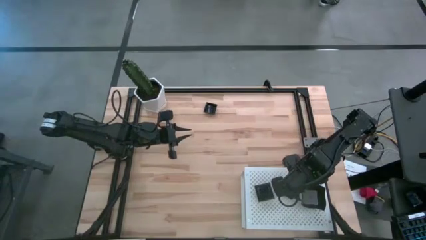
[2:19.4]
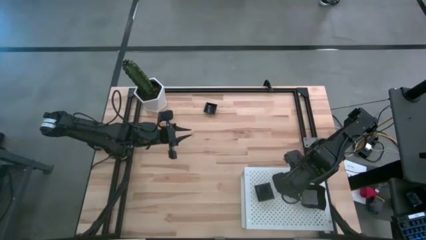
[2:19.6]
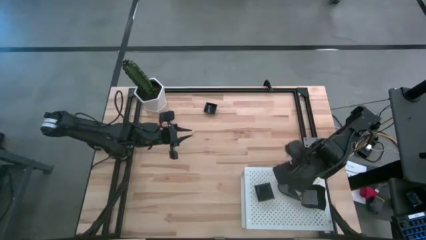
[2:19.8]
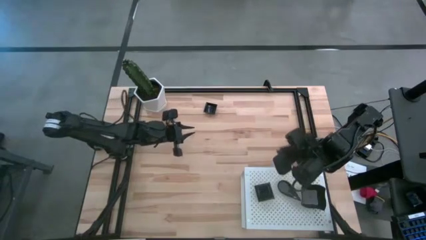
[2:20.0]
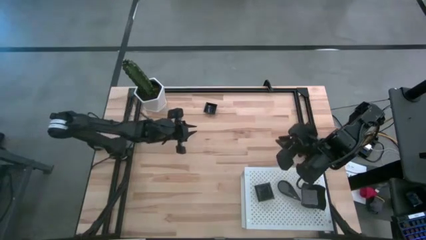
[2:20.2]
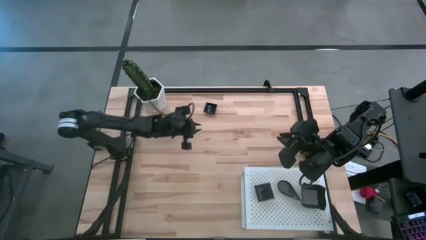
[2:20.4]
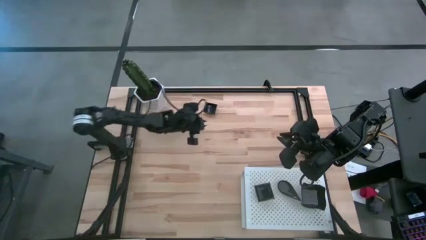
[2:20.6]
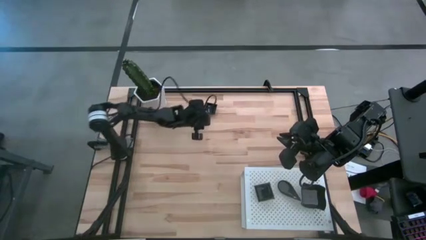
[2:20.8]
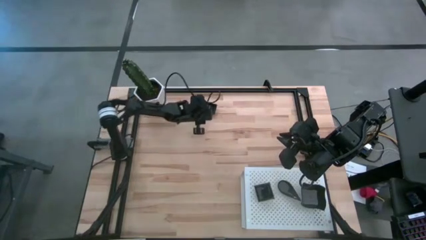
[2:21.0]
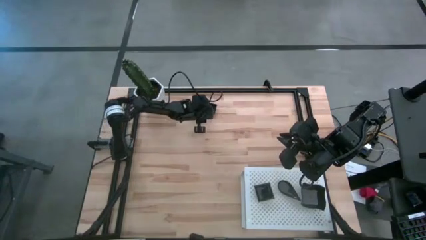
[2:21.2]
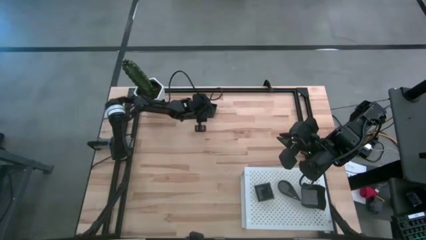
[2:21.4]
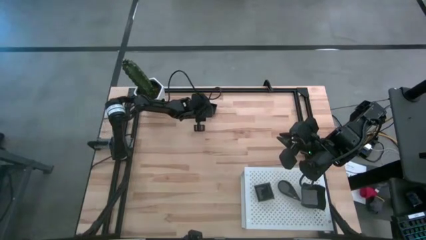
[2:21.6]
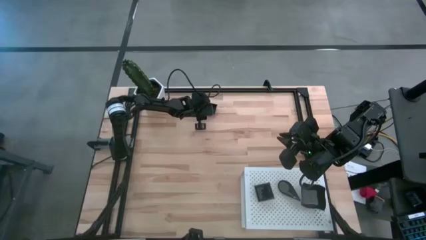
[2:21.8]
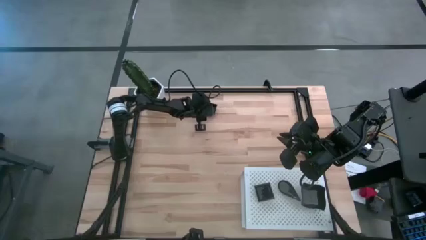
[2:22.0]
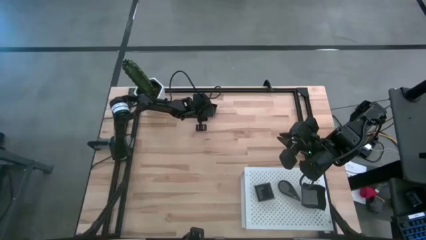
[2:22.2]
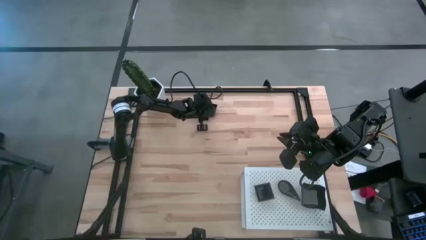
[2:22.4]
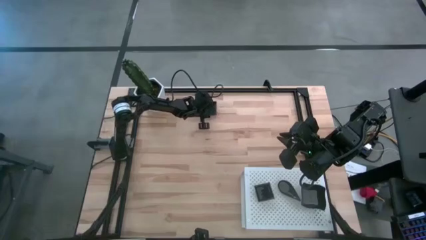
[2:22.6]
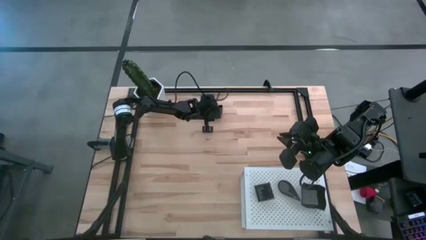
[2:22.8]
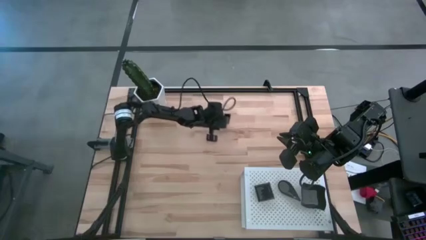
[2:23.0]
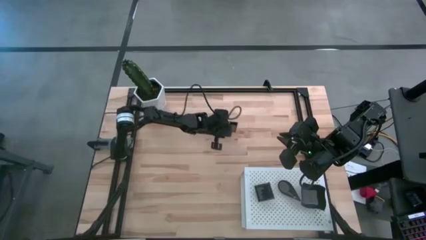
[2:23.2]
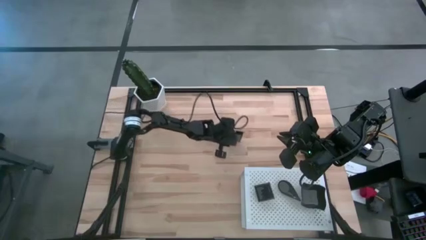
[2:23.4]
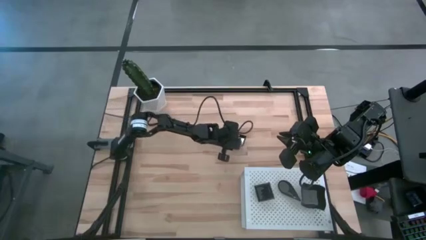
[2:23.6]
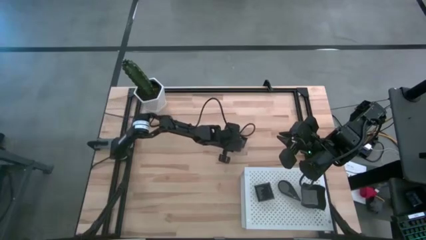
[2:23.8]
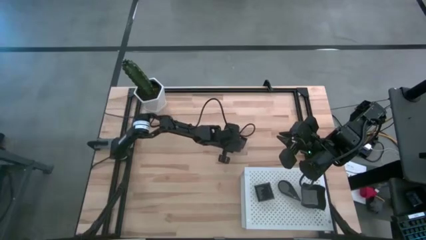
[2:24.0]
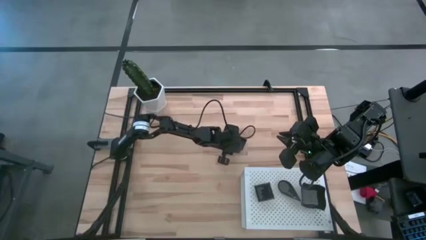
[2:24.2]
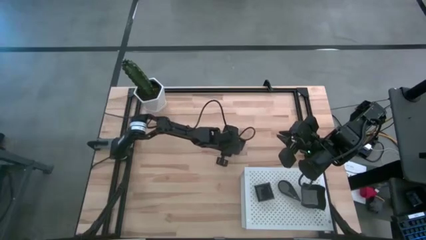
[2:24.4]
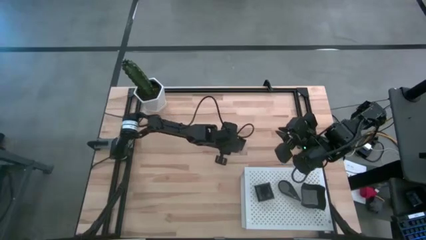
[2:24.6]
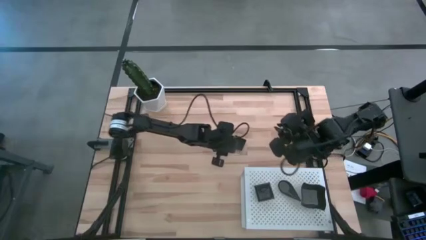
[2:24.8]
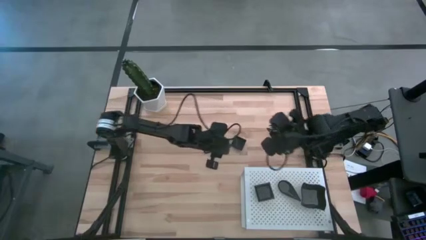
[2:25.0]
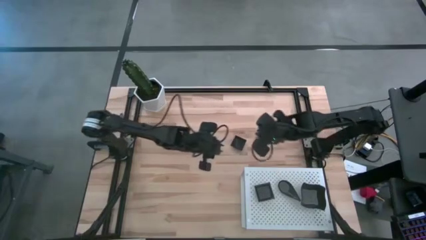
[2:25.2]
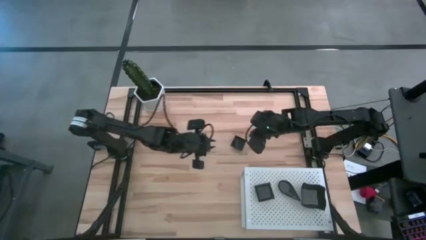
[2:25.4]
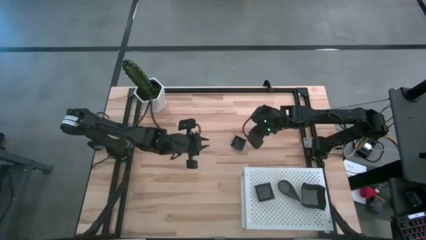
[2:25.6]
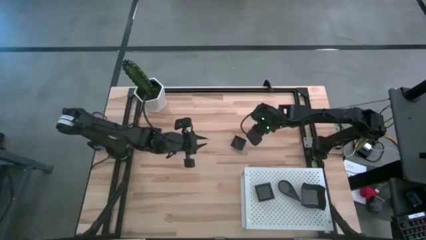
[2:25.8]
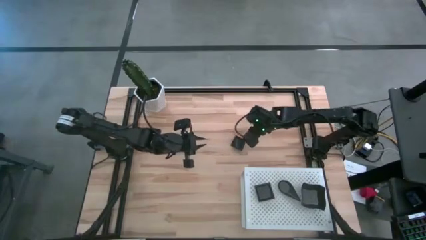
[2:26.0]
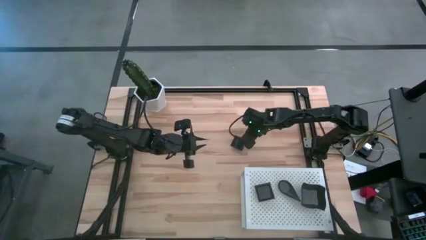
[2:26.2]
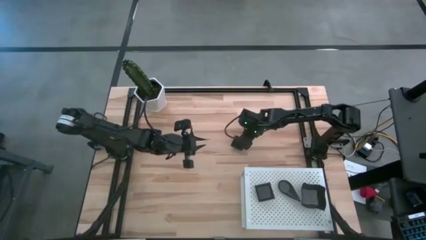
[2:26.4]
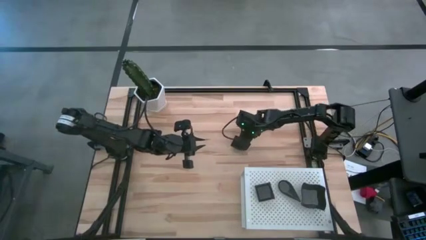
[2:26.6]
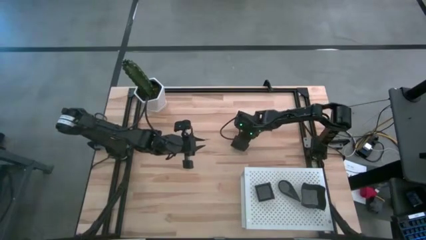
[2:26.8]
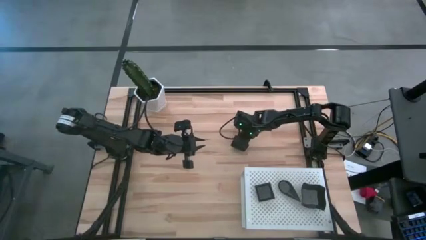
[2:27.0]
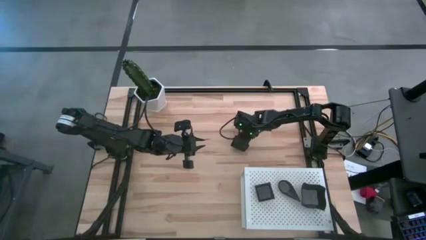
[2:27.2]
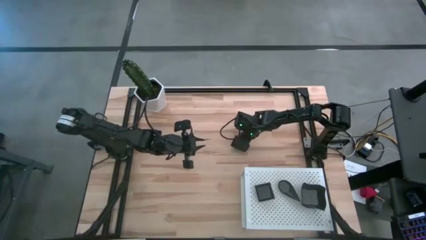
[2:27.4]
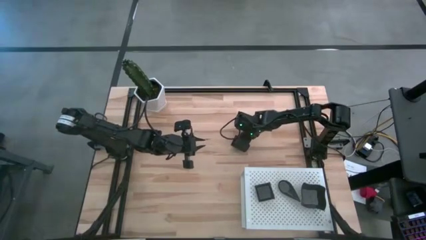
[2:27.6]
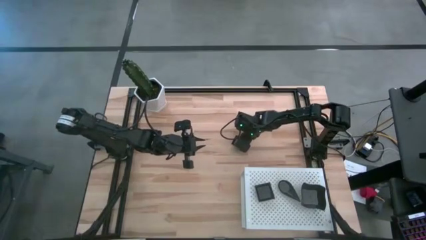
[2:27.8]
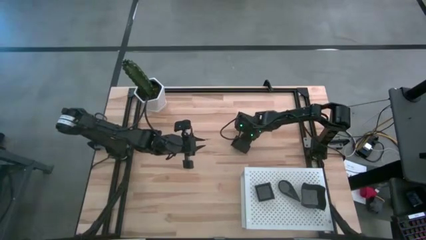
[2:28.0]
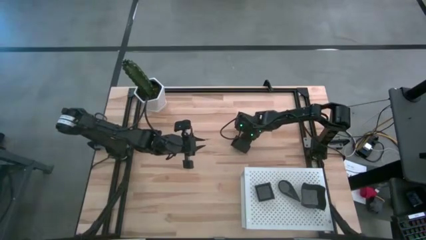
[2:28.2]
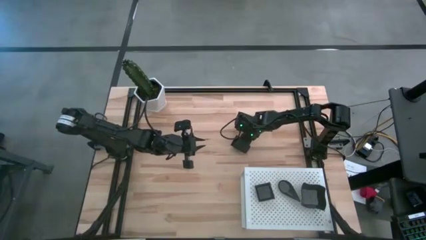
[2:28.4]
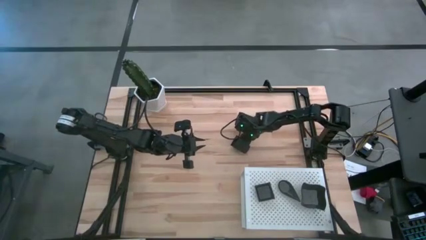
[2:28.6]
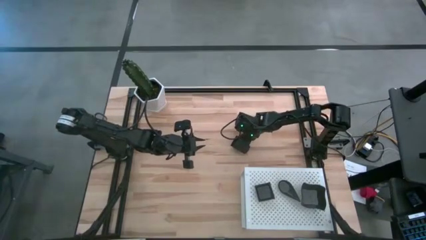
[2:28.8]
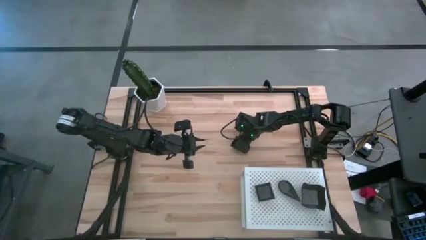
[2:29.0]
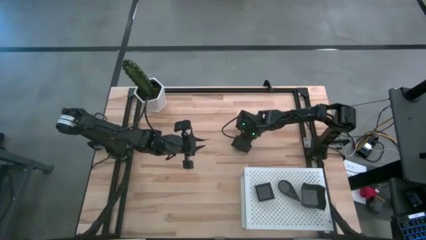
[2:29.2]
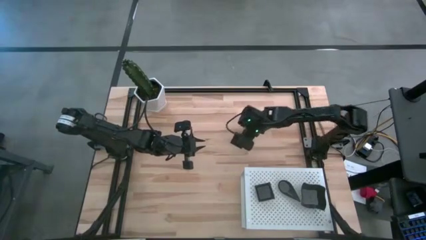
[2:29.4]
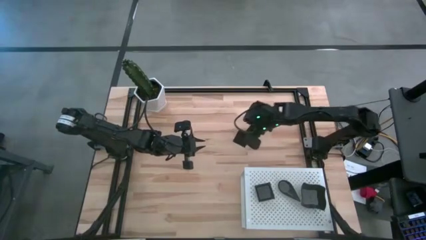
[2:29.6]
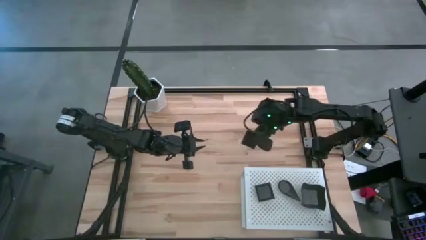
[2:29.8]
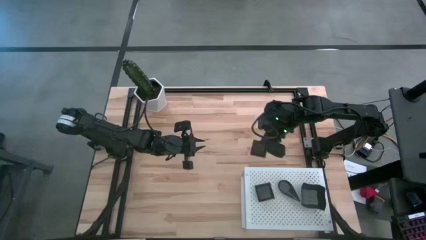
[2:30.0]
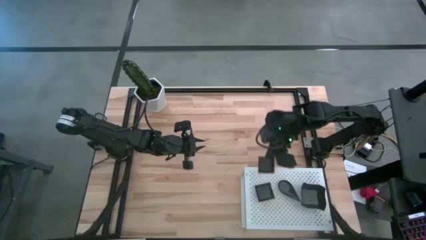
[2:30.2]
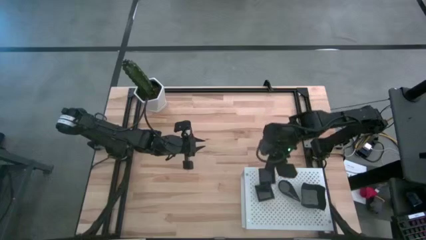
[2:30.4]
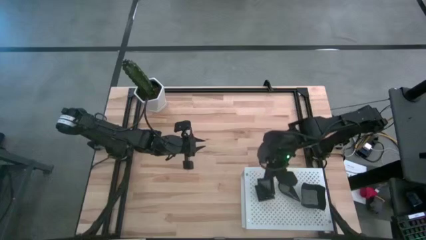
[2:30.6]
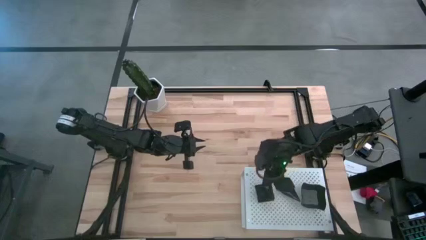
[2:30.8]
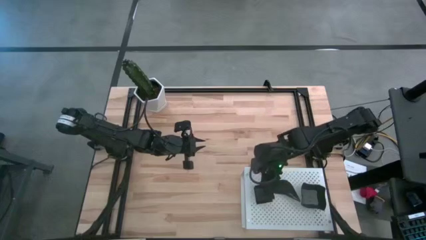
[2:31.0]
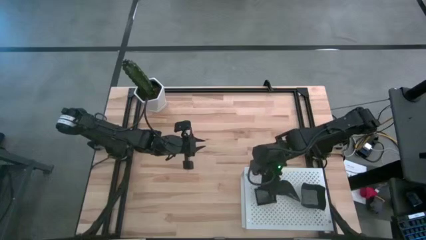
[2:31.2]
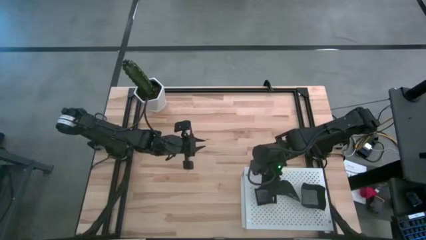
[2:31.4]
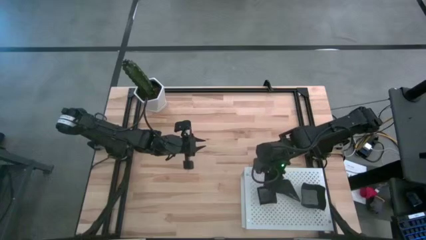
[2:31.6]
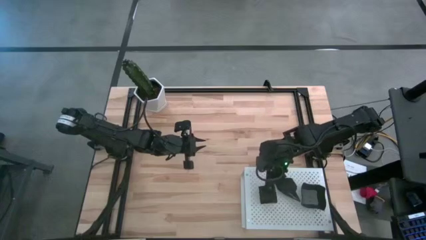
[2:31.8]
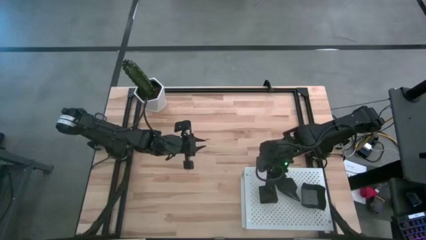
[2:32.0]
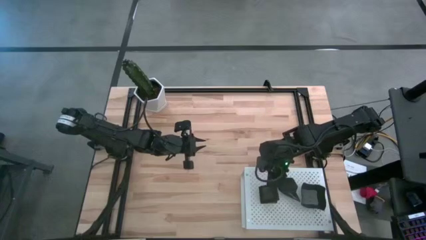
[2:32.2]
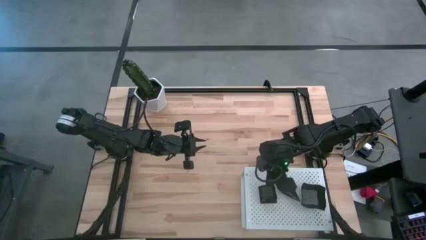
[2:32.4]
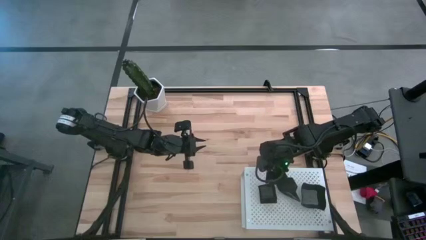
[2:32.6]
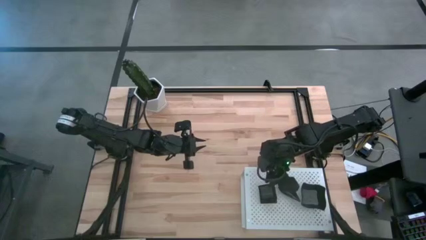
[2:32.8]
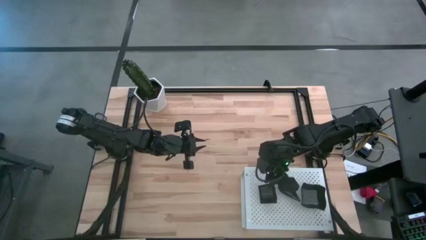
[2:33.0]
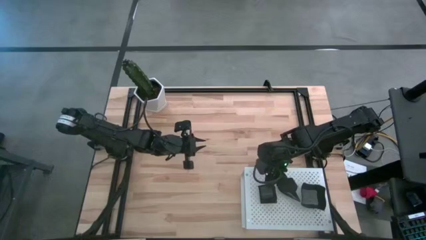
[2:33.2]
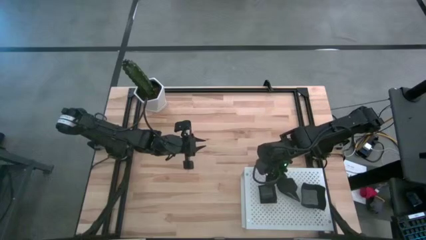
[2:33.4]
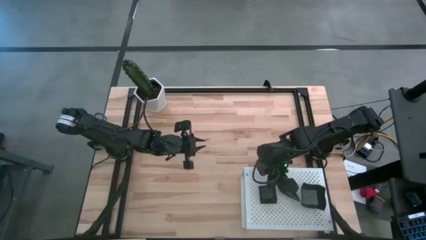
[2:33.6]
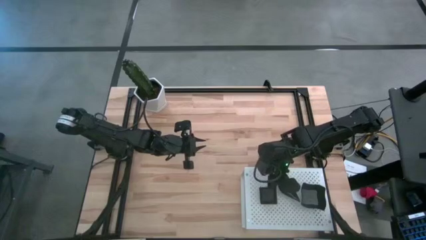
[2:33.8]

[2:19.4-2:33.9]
Task: Pick & Place Mini shaped plates
Stack the square plate on top of the other square plates on the shelf

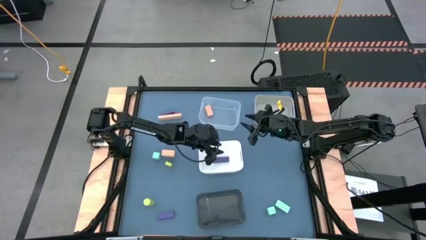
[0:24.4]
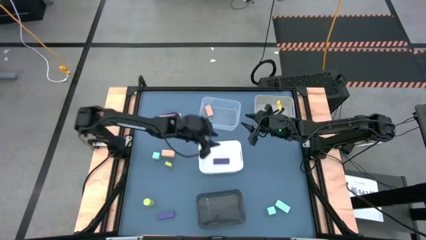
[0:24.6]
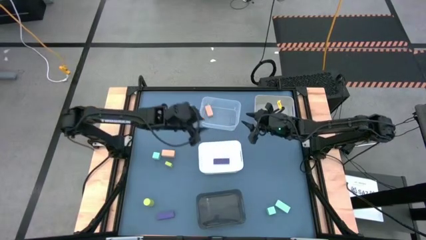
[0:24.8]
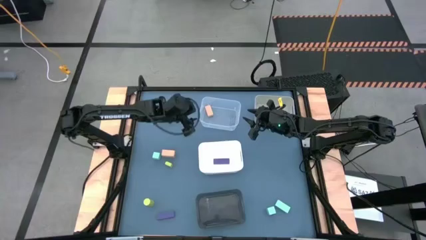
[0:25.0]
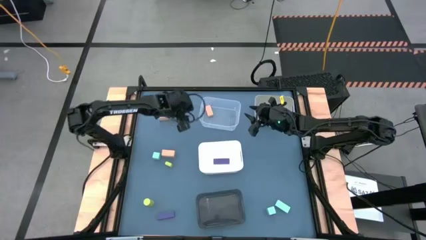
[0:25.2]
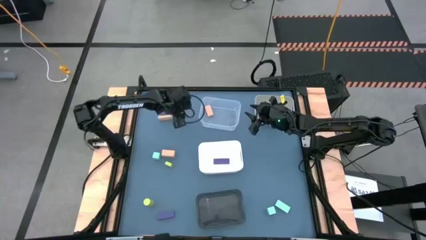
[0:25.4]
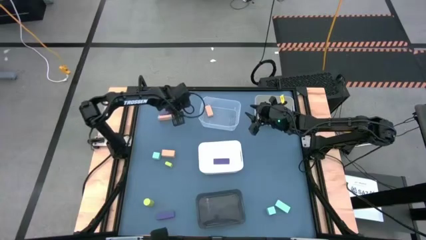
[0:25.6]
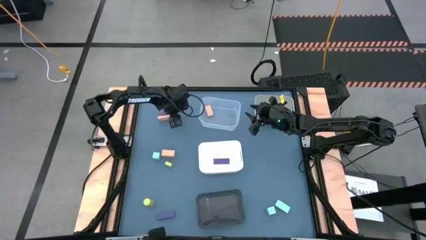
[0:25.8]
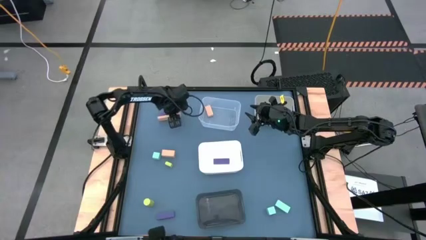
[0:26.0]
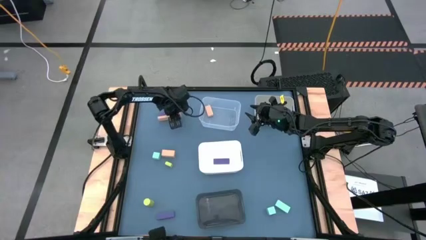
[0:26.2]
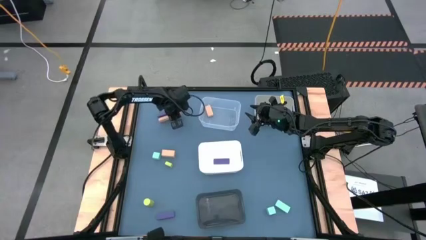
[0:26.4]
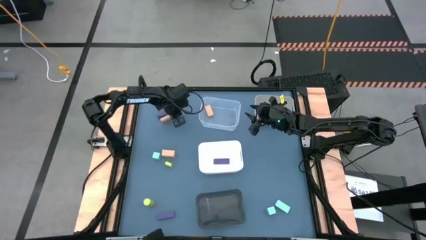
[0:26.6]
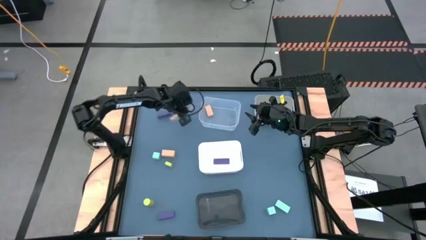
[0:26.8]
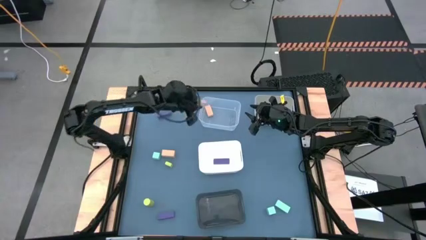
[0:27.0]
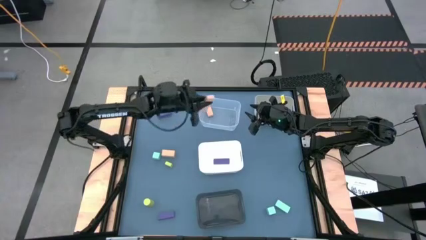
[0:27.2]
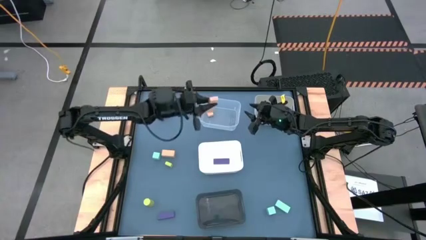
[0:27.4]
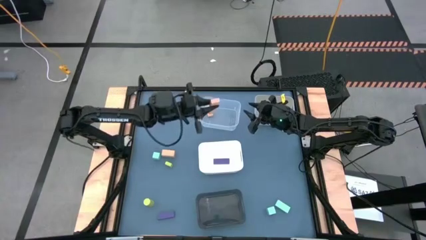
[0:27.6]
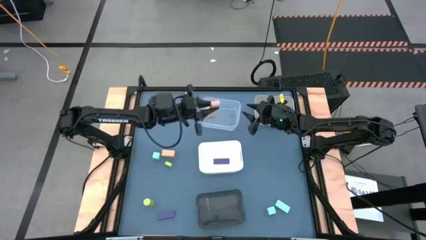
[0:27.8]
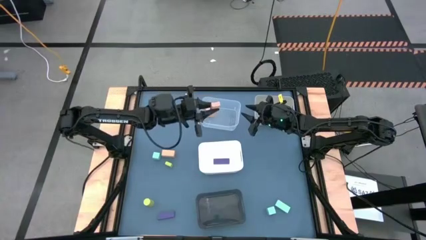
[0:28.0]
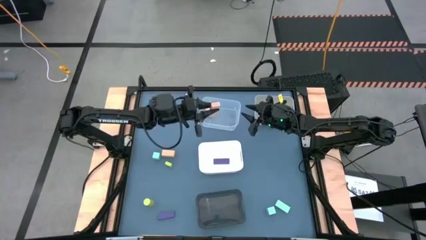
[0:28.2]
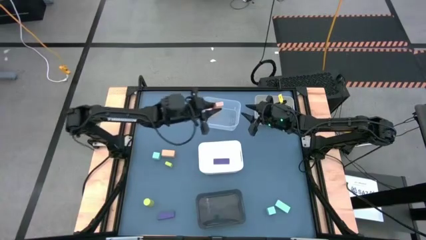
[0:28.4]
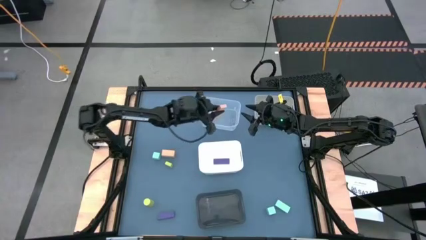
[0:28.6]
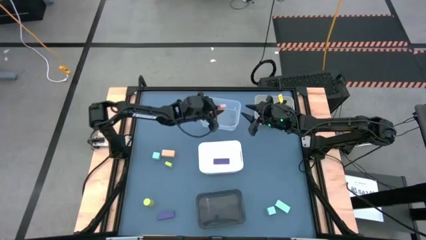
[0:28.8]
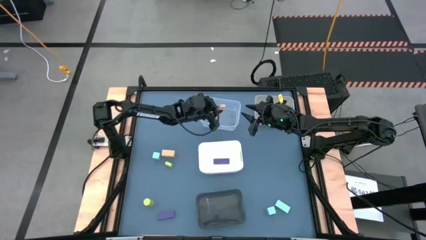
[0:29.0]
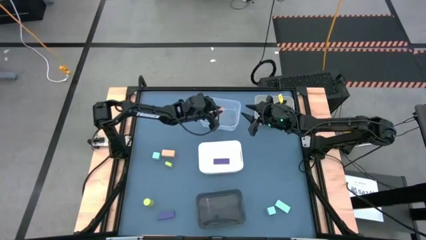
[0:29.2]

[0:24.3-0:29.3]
Task: Sort & place blocks by color
Put the large orange rectangle block into the transparent bin
